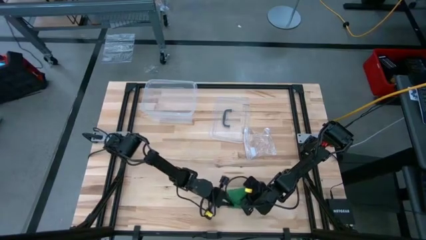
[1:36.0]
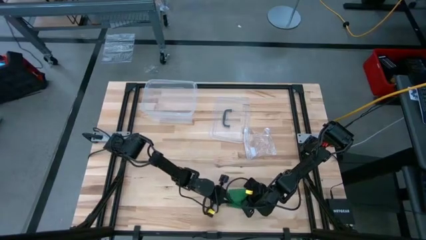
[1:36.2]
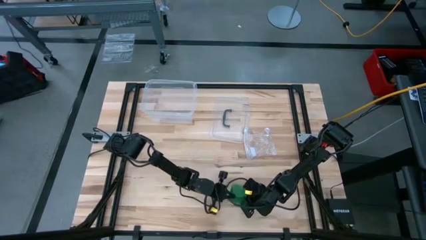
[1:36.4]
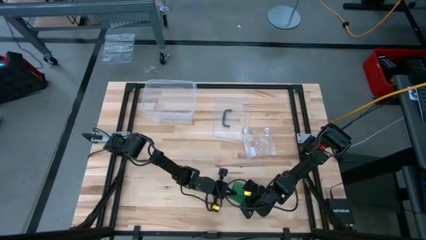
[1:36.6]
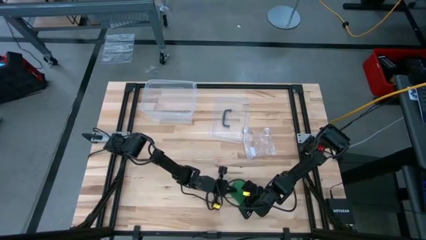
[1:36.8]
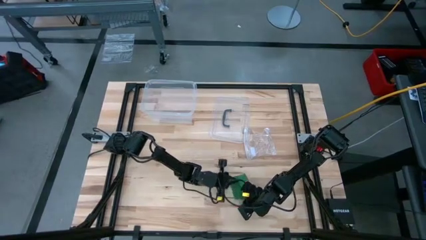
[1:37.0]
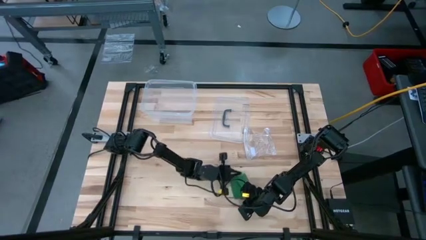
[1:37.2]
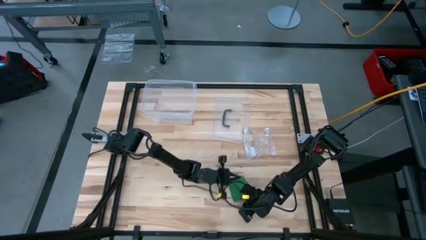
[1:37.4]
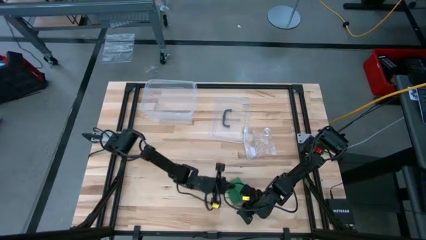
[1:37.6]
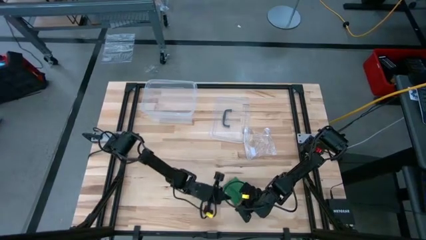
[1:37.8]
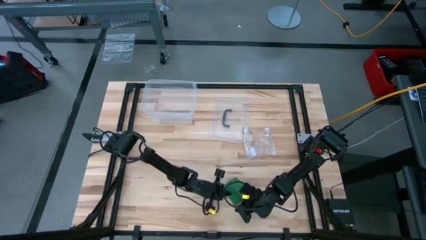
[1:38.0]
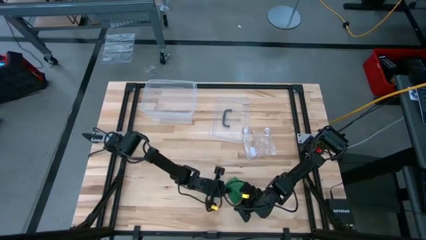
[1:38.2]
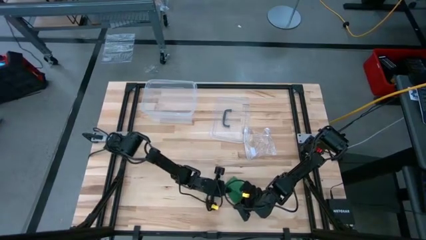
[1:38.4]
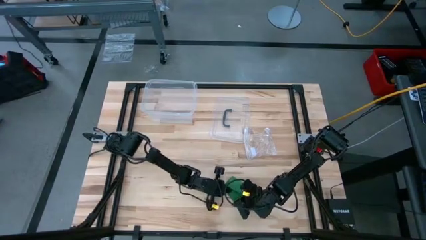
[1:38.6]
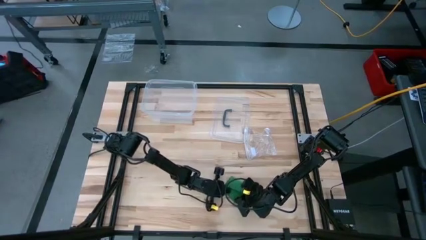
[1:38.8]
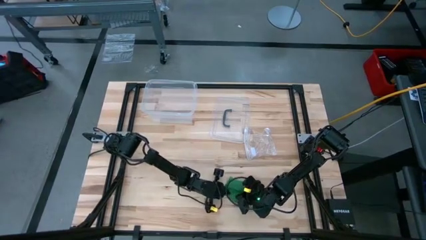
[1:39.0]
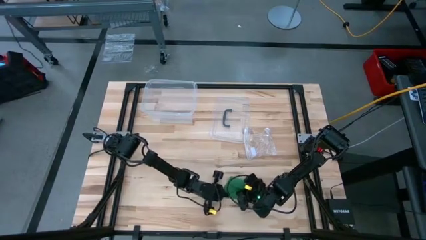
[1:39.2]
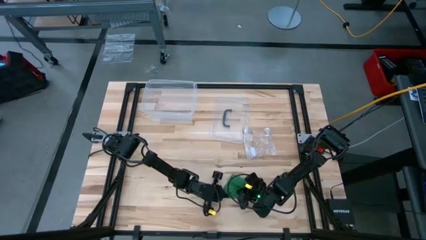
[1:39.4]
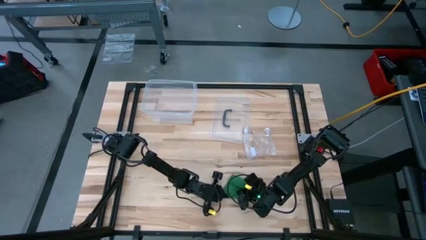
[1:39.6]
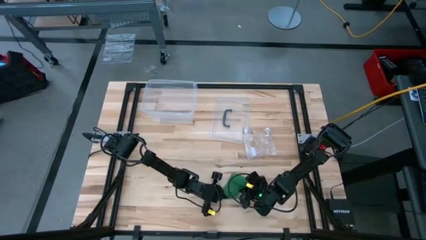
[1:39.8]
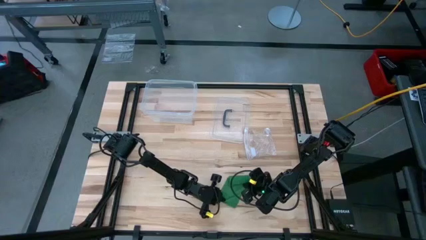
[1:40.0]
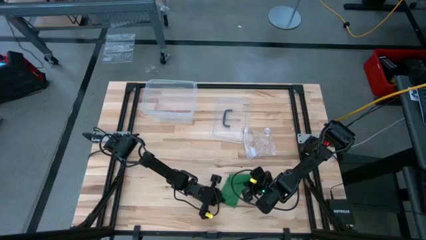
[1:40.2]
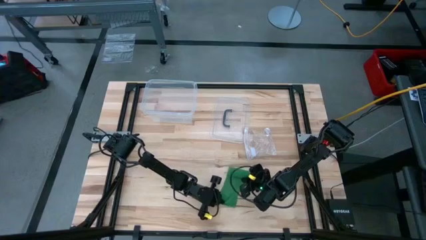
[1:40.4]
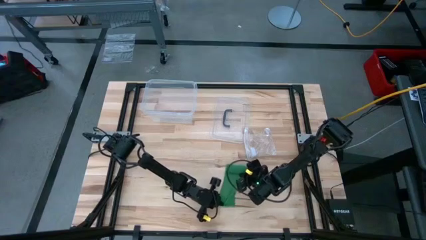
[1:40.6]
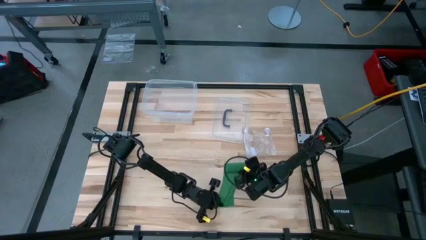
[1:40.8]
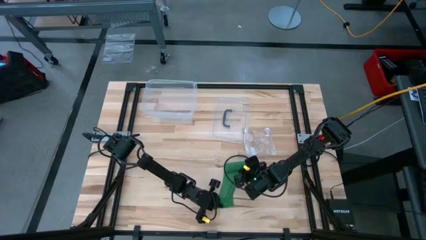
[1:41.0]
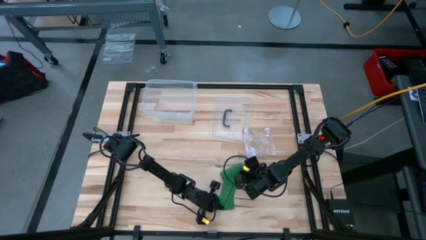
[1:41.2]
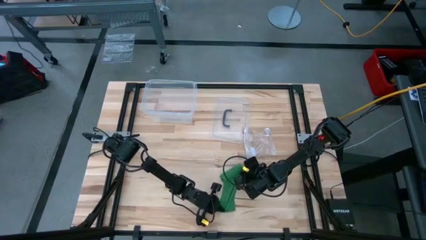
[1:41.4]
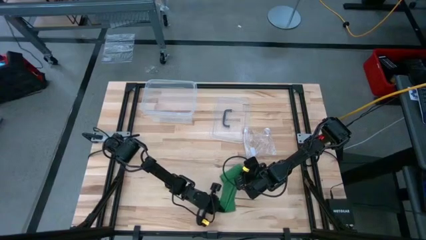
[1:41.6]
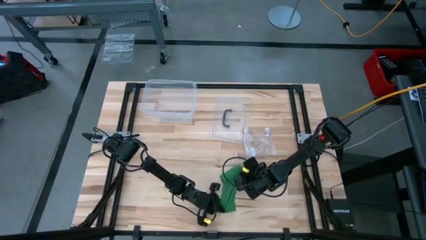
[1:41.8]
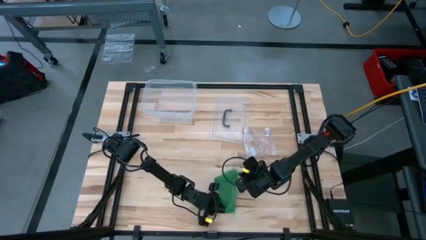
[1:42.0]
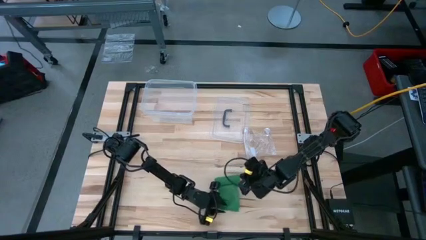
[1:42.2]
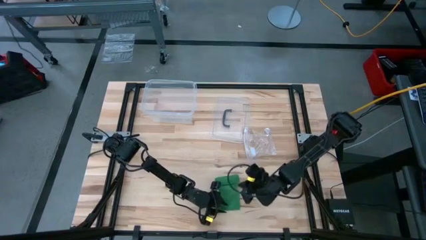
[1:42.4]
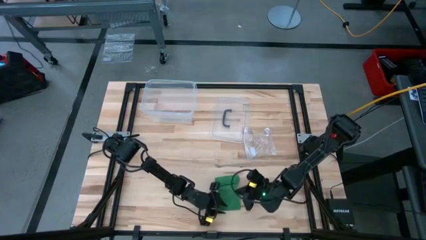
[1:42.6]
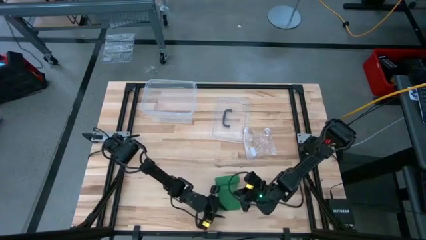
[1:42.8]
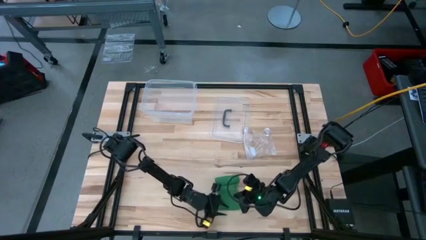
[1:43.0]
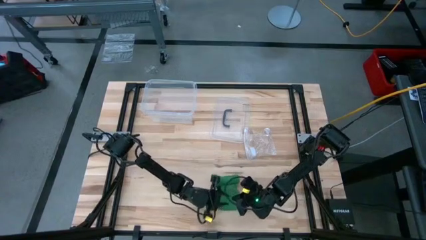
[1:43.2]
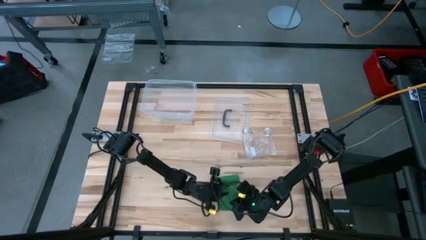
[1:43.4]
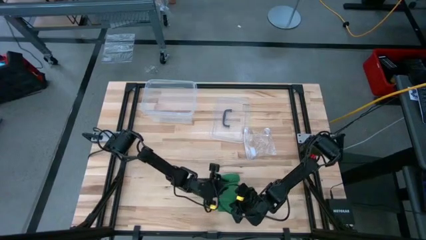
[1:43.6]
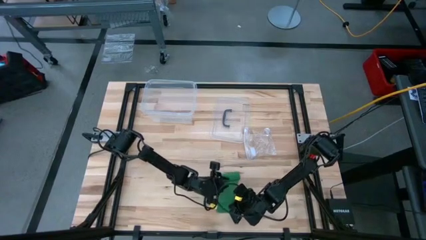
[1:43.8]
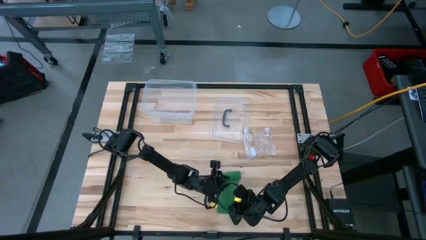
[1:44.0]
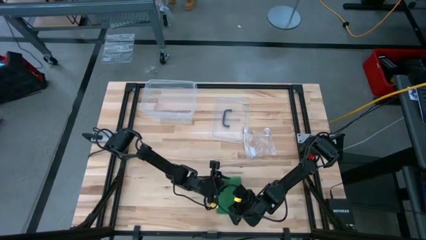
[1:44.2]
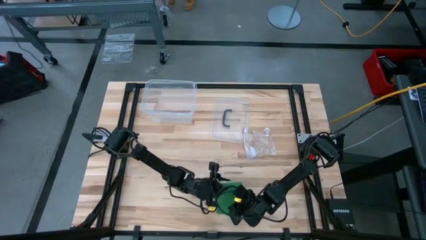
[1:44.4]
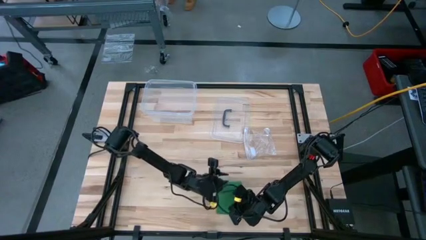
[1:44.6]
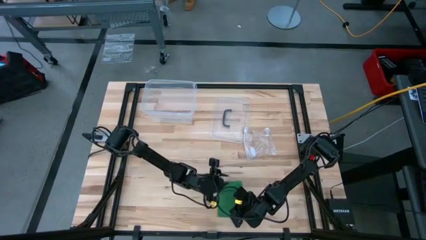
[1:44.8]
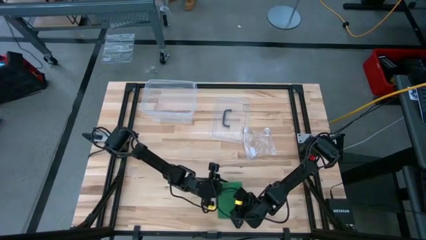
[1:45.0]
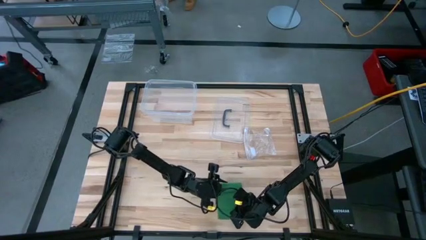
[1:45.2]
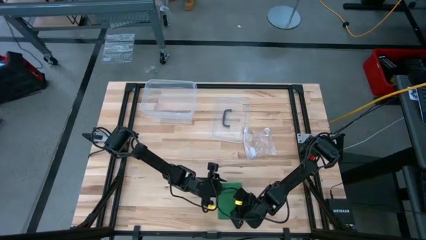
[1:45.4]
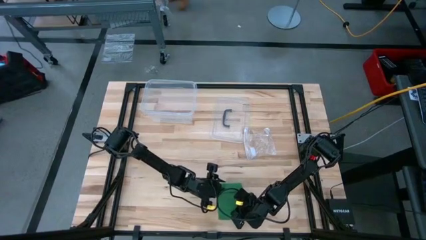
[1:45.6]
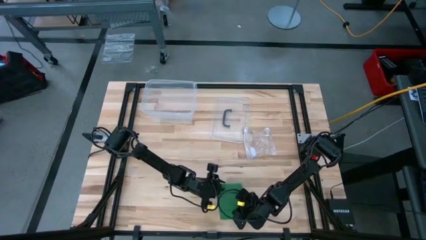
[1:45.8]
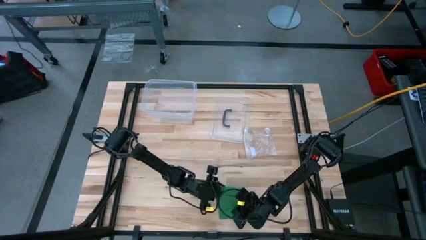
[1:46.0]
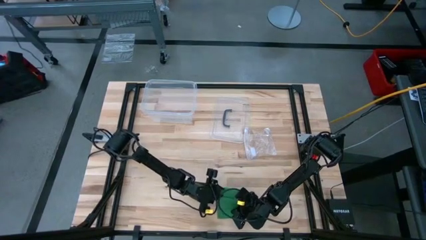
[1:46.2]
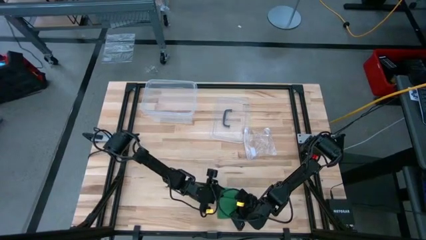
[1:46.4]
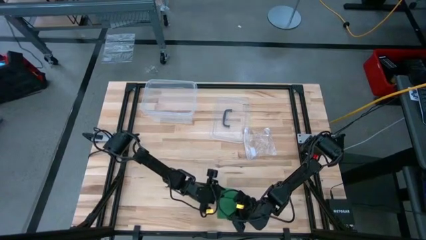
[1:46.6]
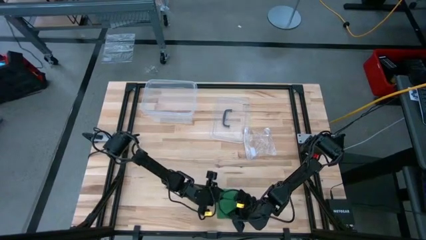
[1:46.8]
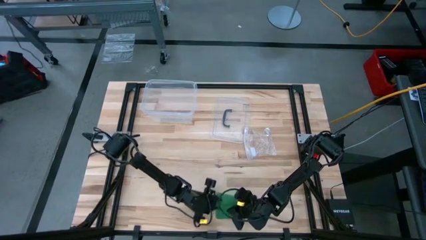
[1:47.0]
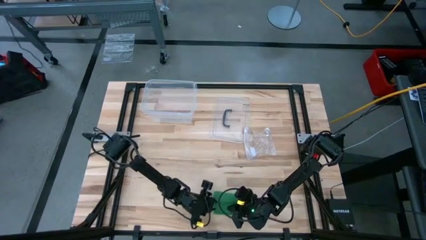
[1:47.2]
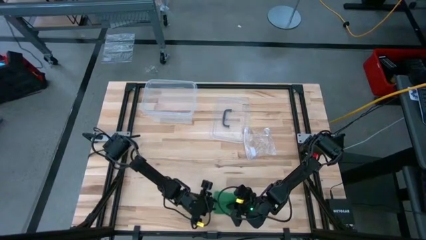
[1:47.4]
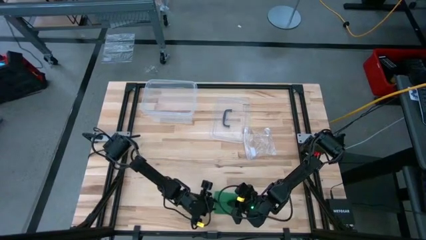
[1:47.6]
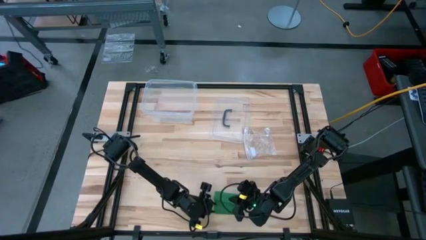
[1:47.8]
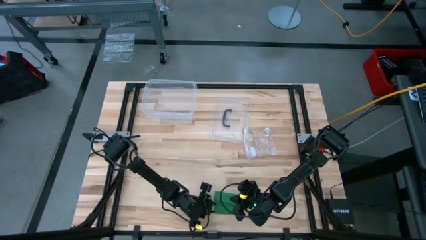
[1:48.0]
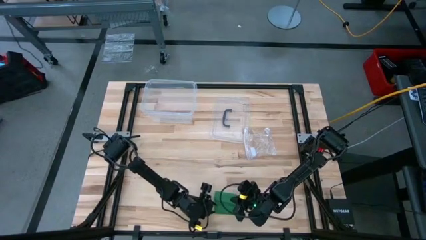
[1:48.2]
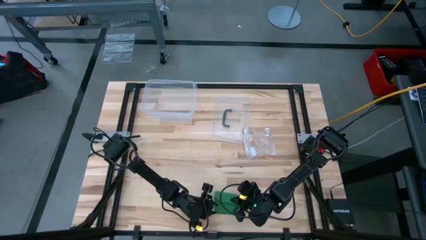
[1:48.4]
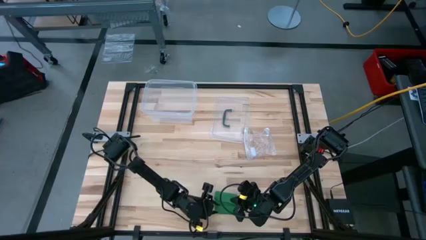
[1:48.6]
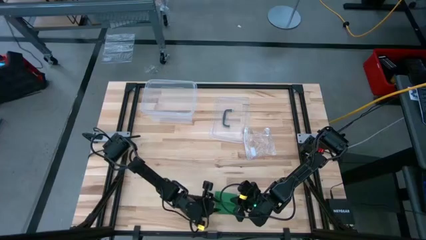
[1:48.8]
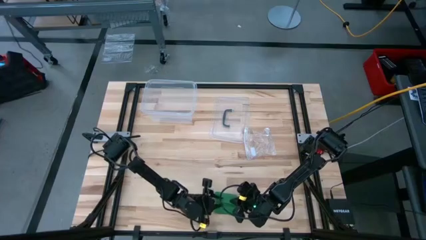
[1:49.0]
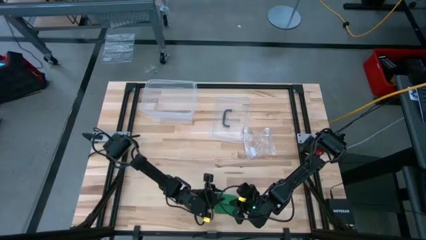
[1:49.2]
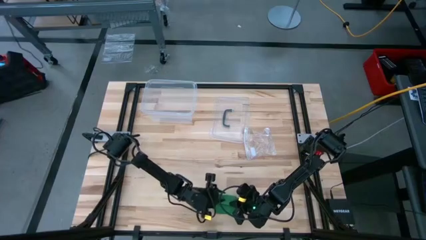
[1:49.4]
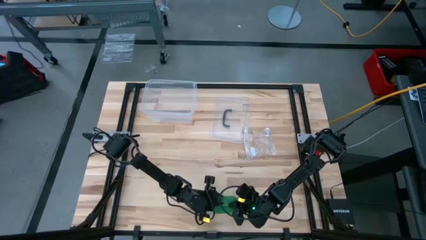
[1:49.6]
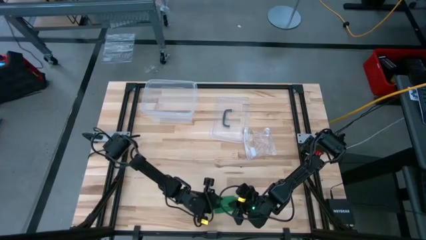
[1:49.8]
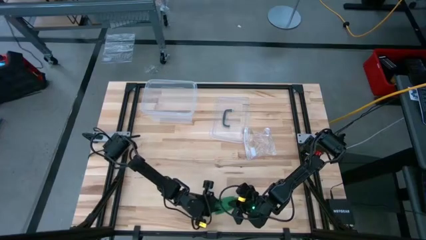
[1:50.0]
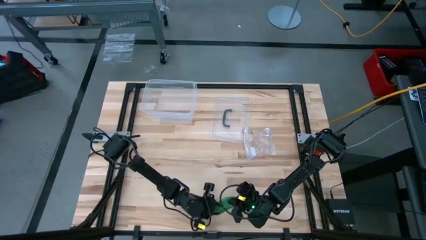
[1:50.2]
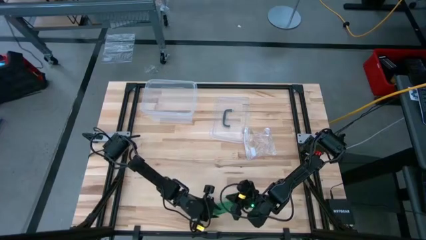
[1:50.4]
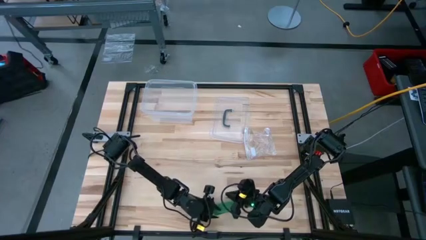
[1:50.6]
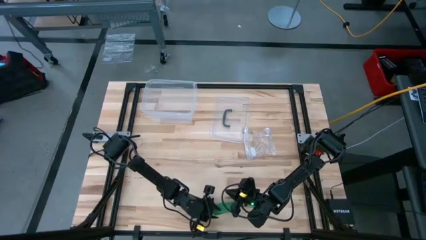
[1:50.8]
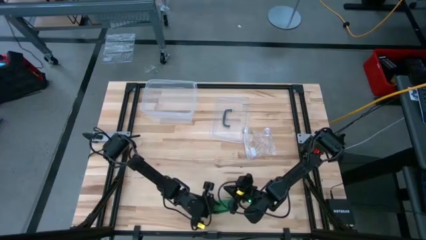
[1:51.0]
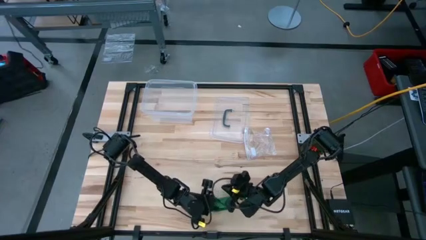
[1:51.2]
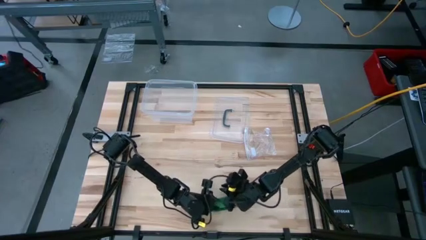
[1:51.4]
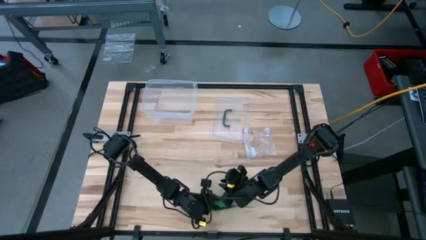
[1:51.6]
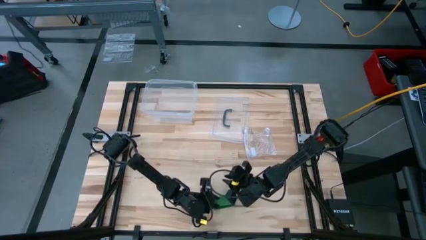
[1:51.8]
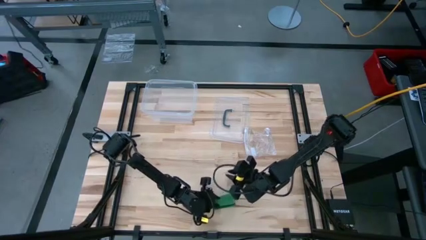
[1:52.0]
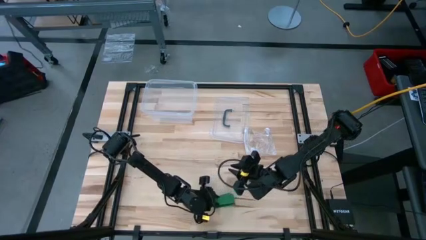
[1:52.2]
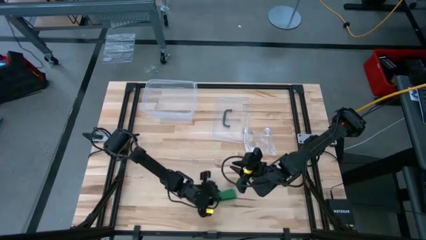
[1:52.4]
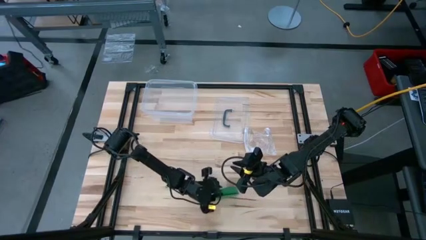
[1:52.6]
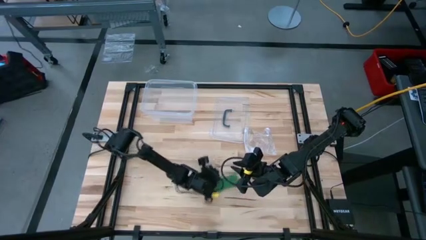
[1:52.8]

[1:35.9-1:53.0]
Task: Roll bandage
Roll the green bandage
